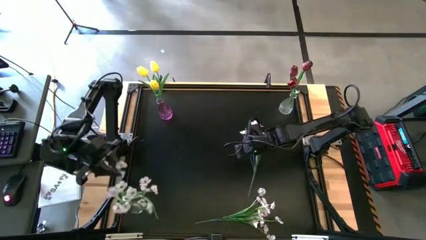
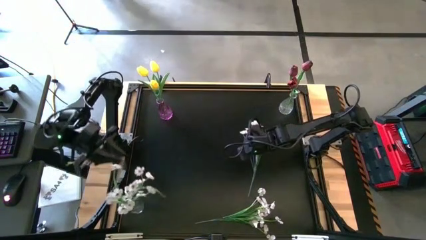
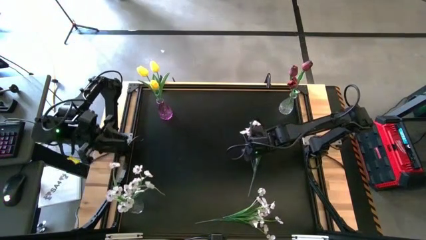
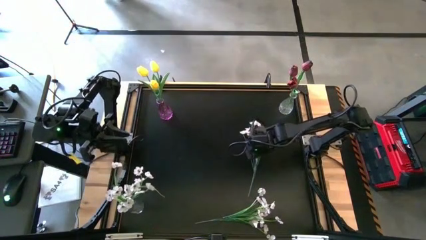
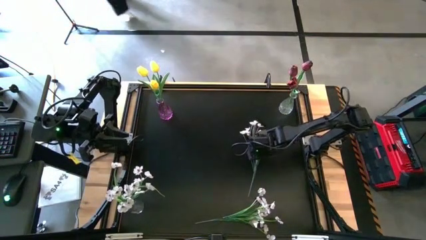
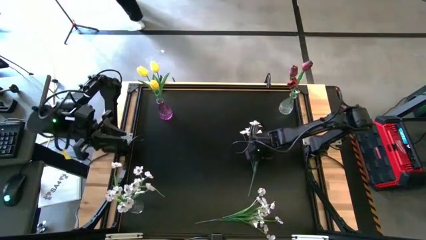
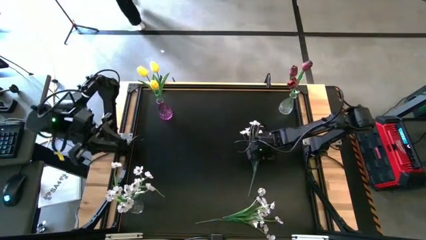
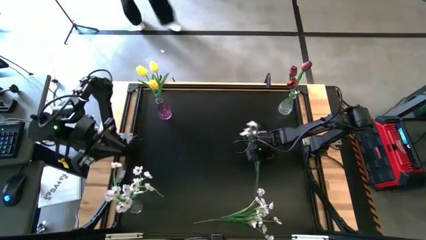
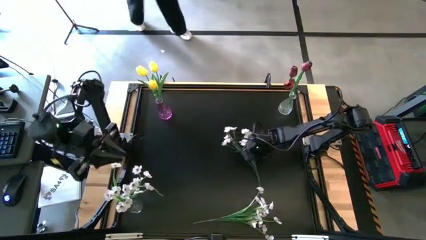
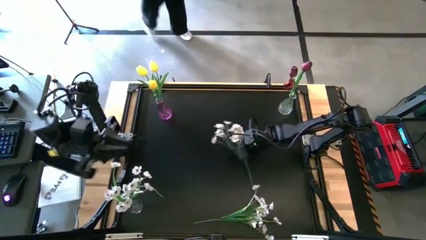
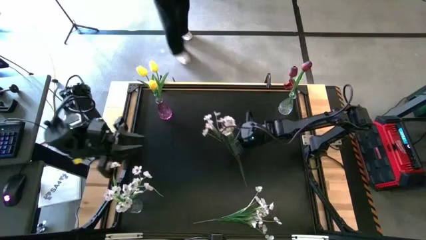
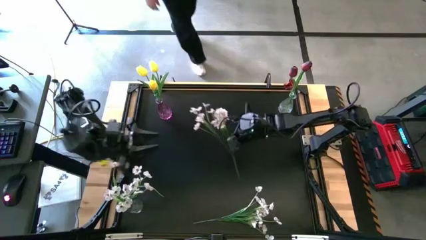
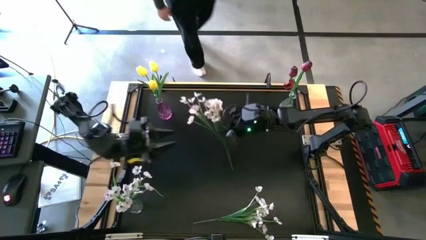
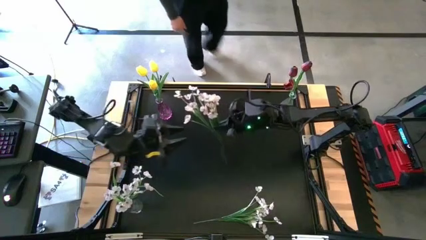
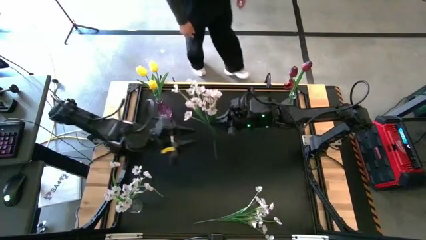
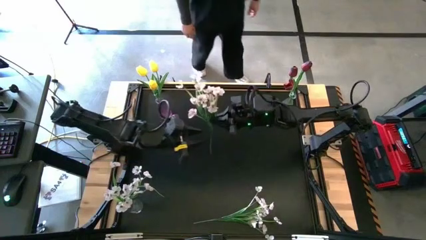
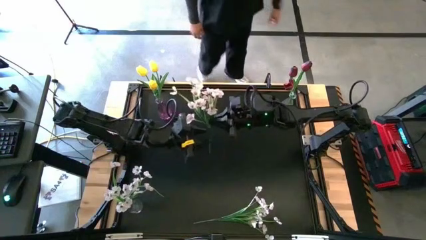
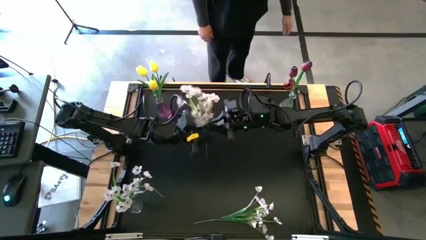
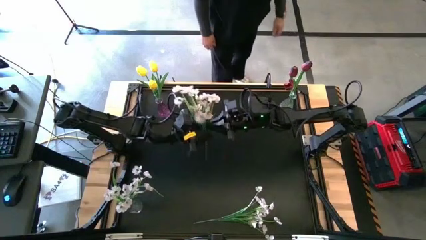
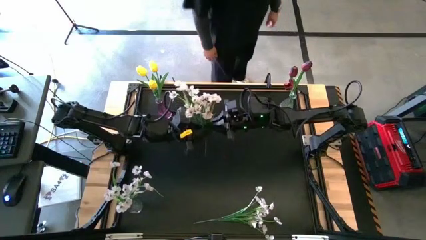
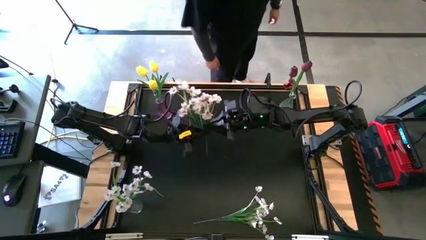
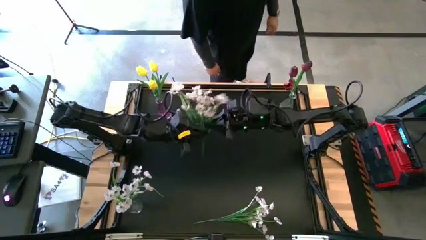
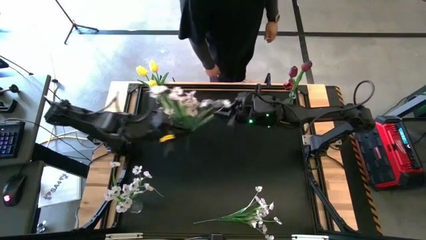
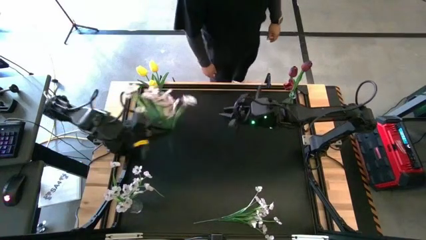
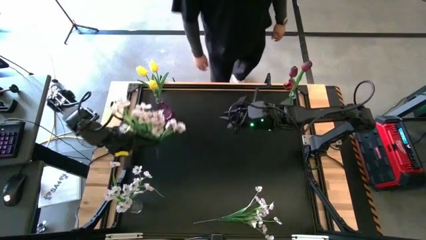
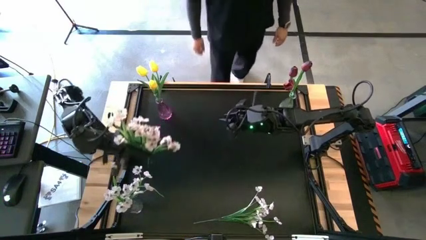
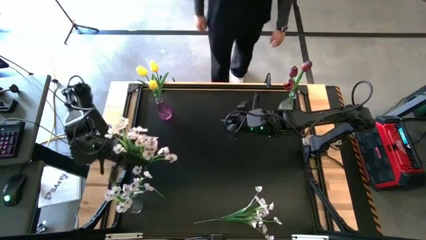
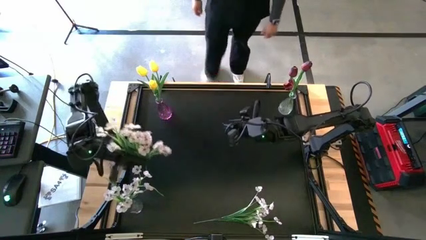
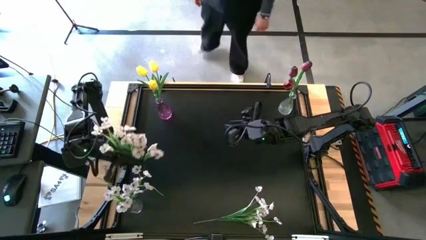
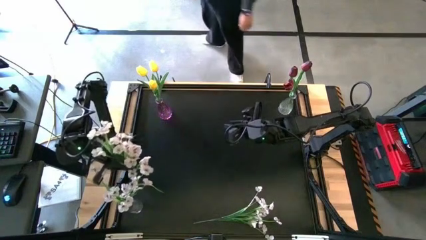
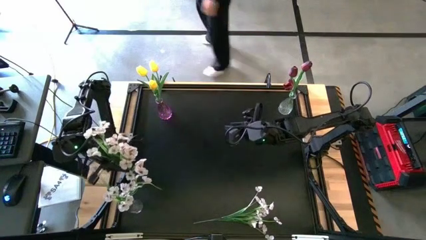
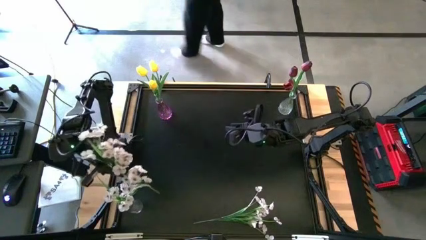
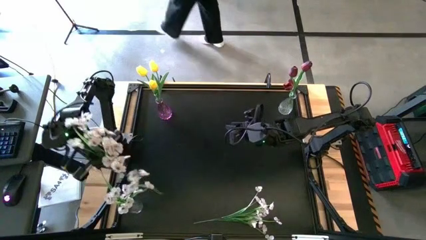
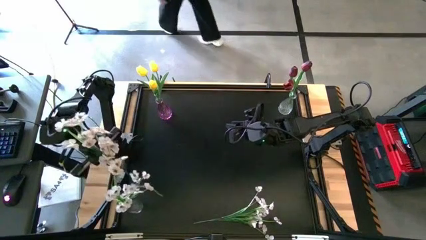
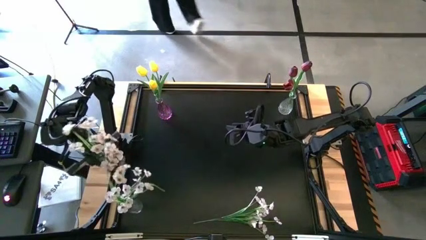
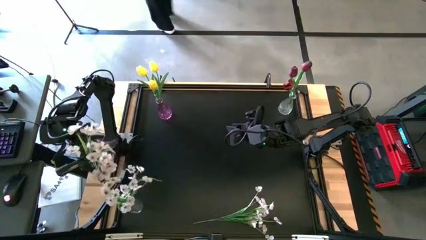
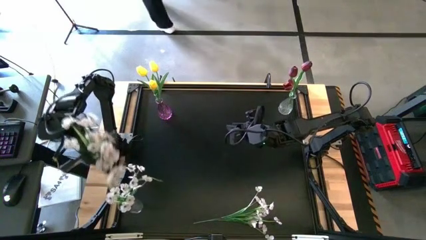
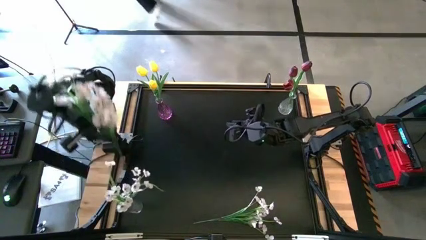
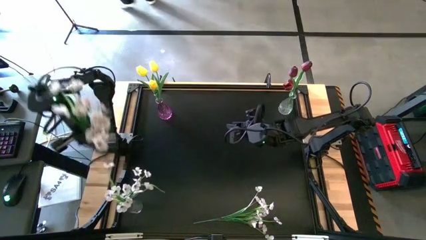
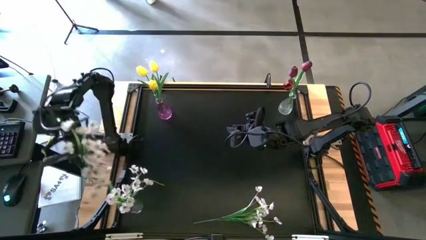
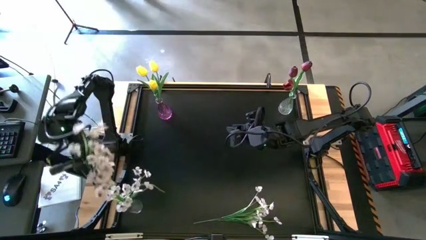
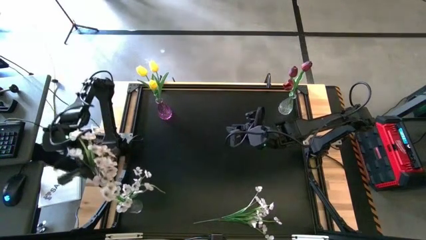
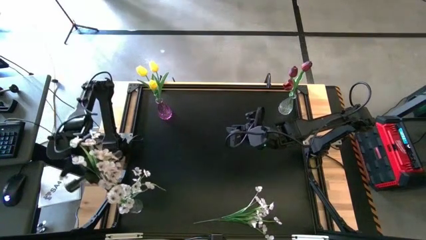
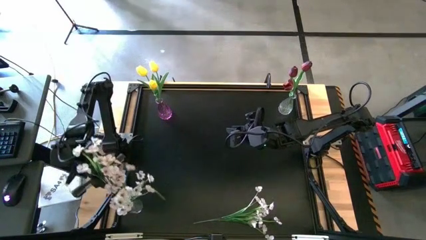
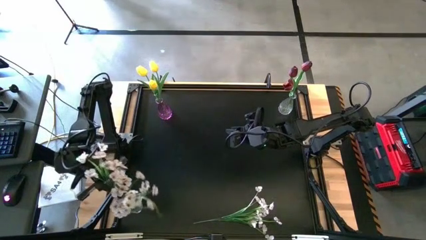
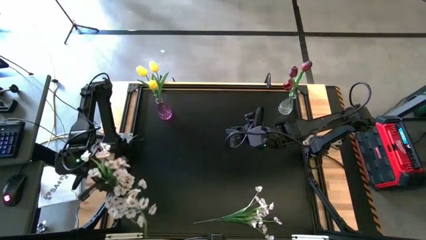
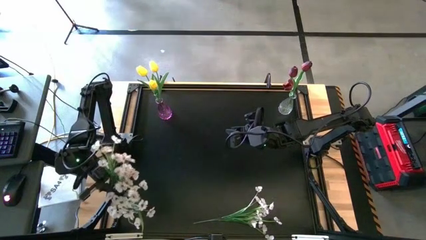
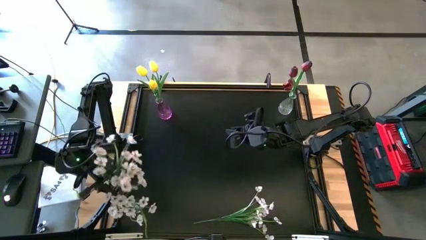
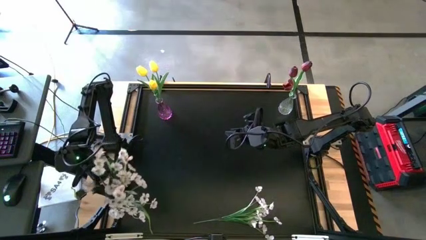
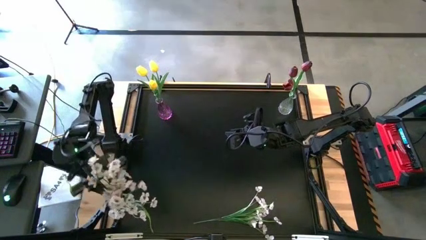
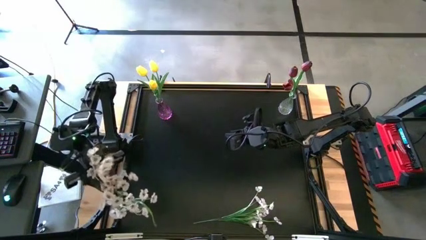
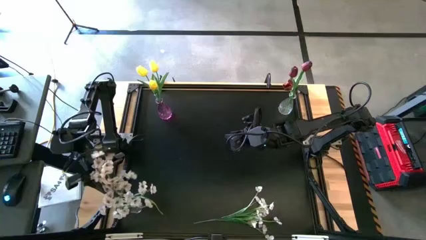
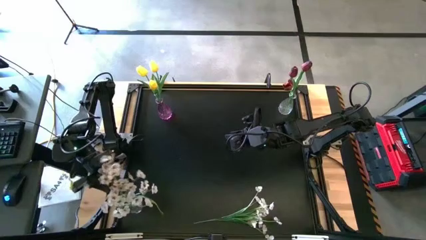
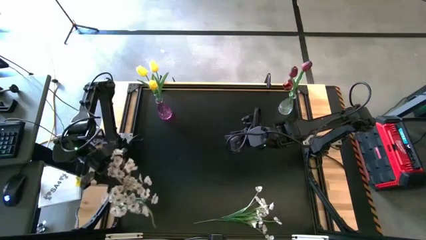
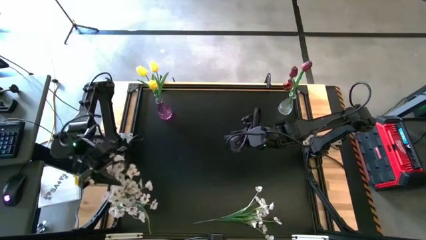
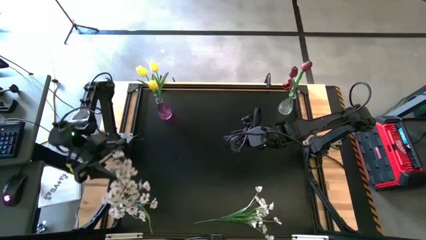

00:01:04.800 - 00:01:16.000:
Task: Sort flowers into vase by color
Put the top white flowers into the bottom transparent vase

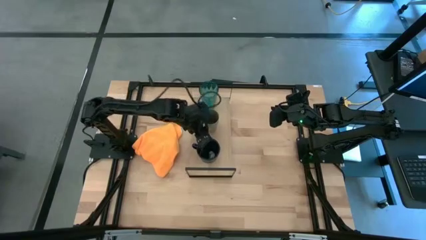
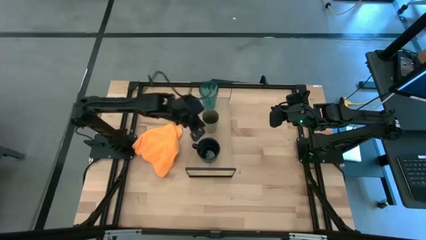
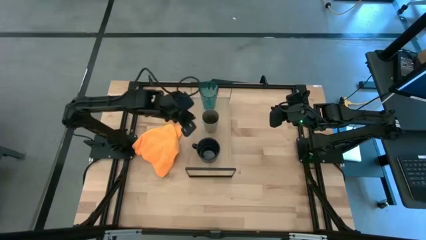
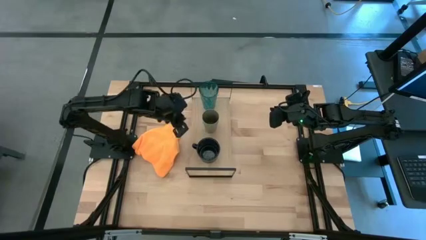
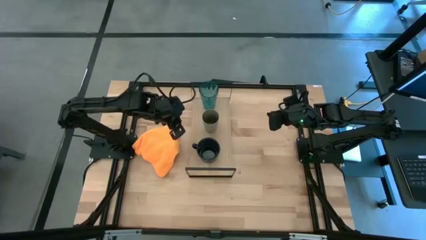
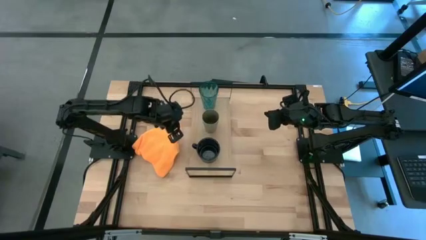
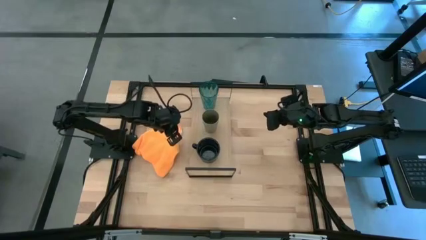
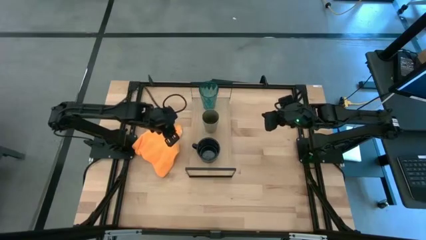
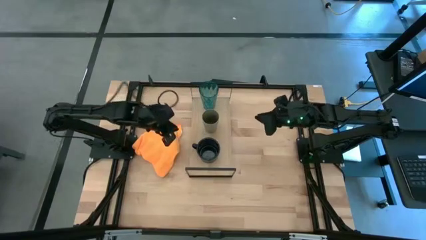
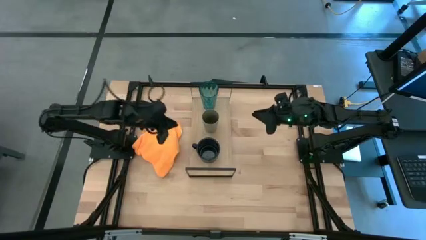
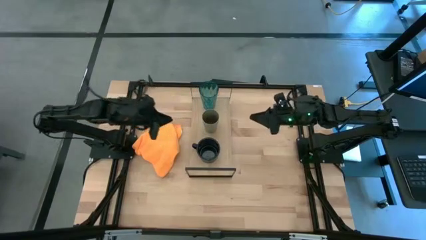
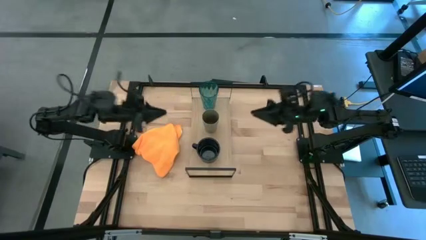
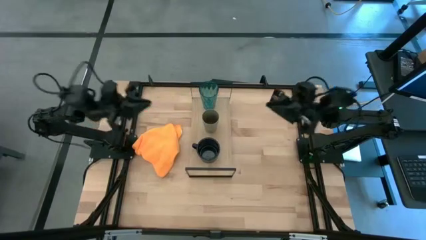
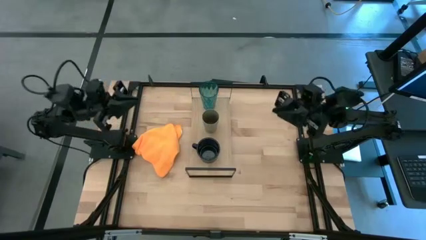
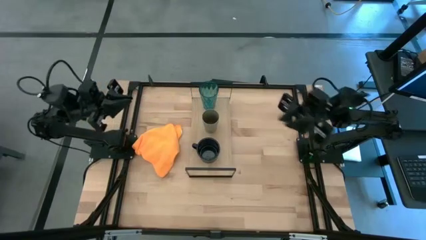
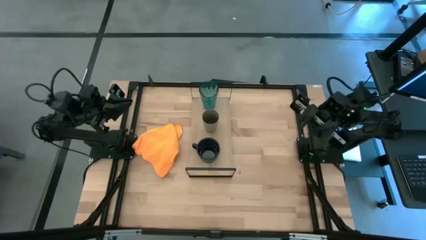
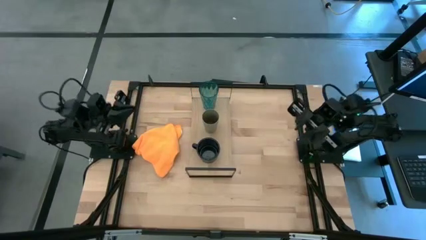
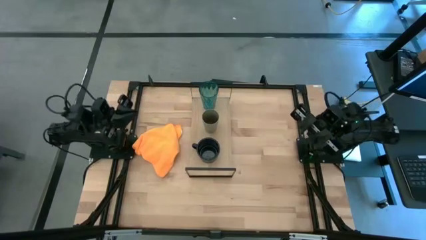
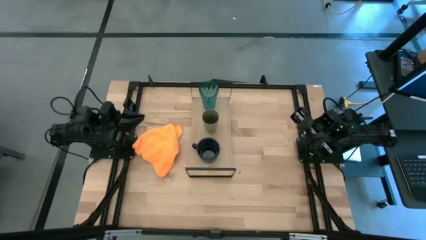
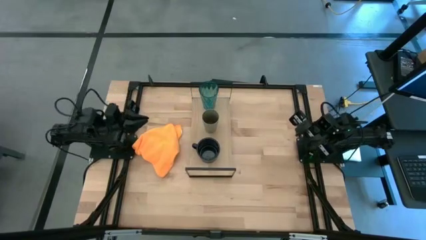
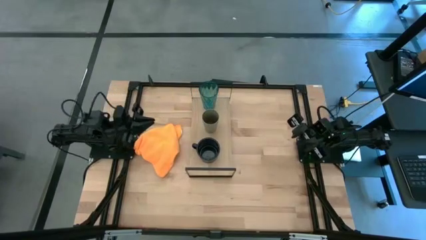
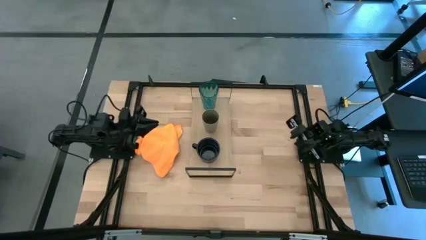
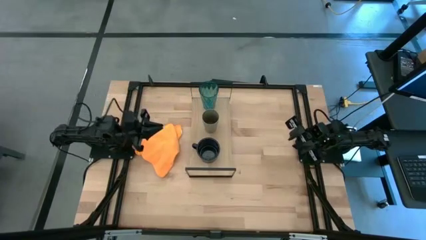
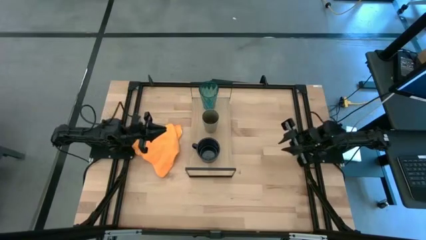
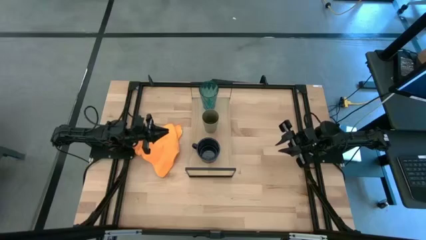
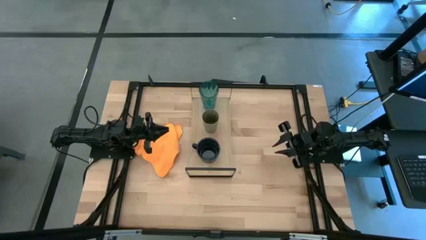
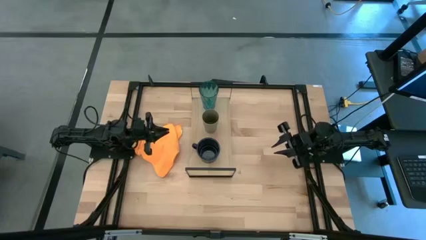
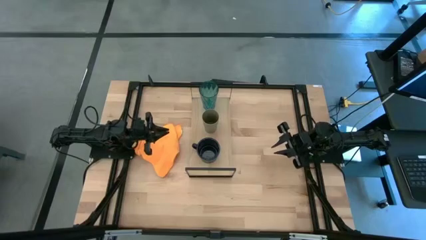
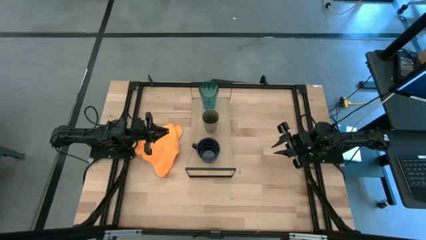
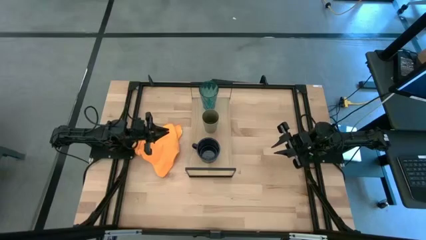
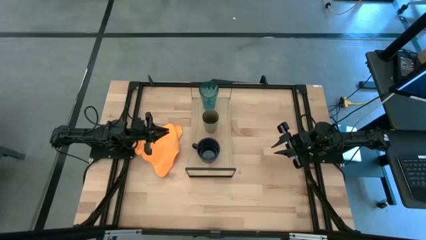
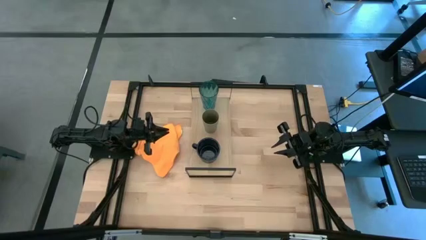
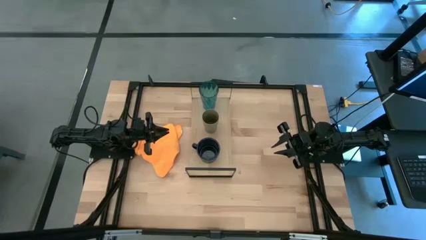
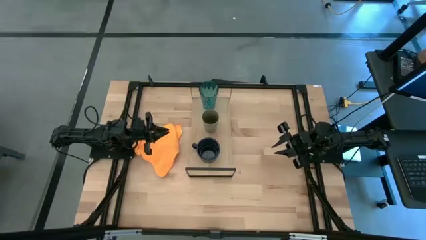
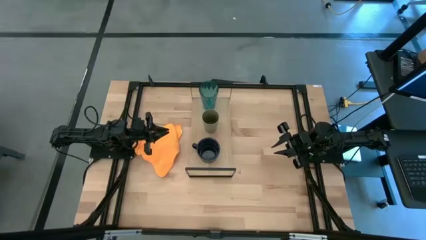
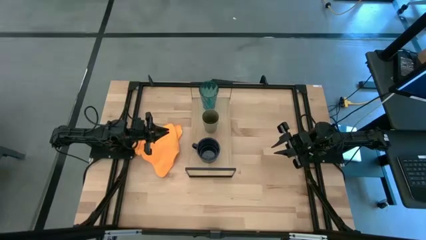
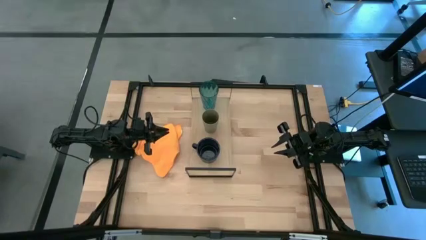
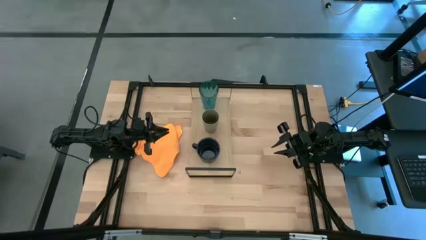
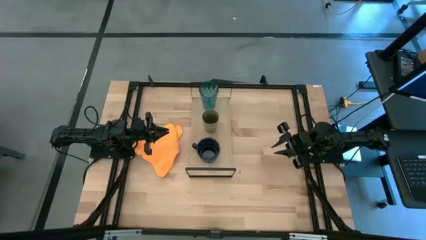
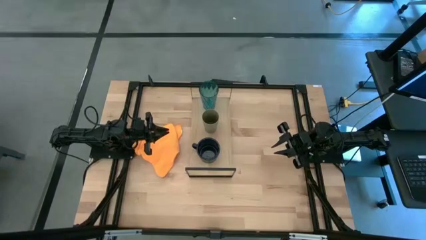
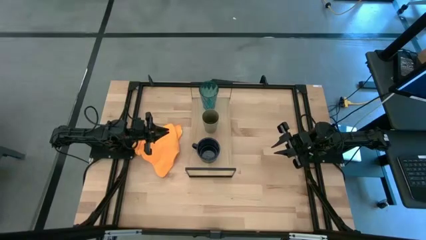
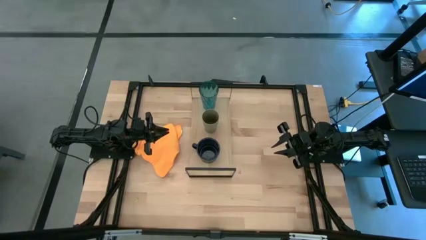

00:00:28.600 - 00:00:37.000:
Task: Stack small to large cups/mugs on shelf
Return to Home Position
